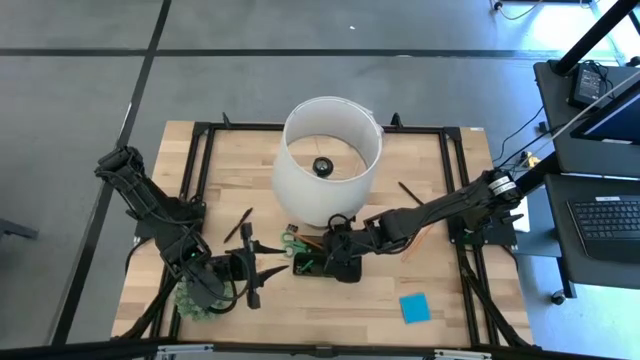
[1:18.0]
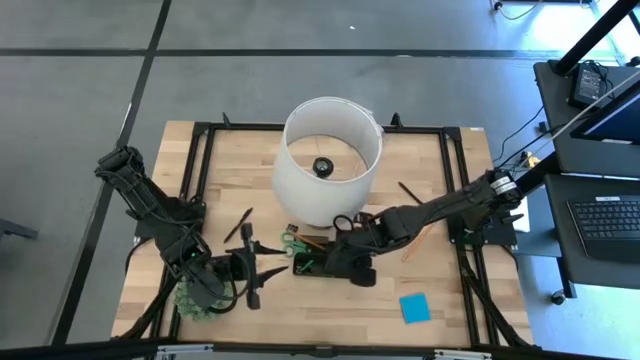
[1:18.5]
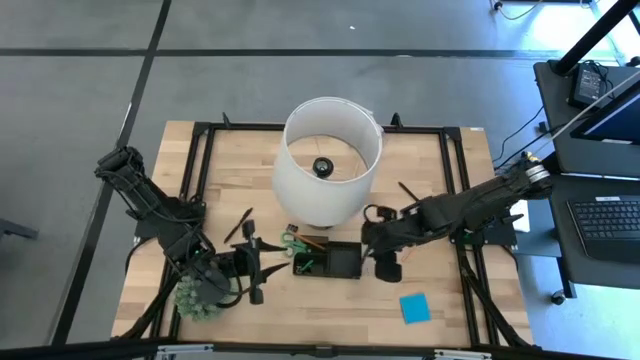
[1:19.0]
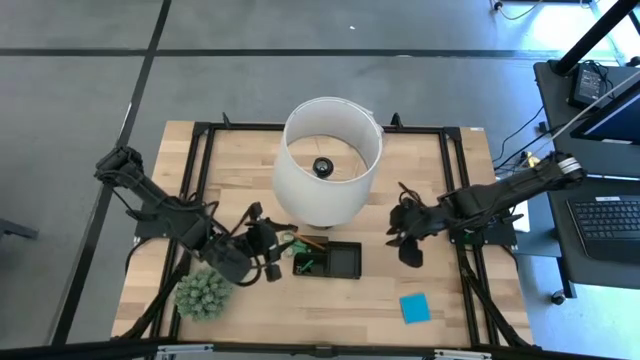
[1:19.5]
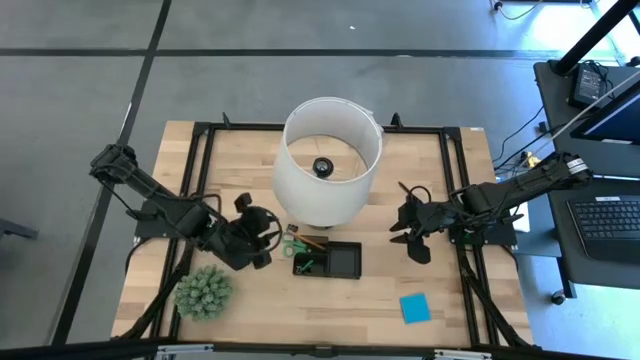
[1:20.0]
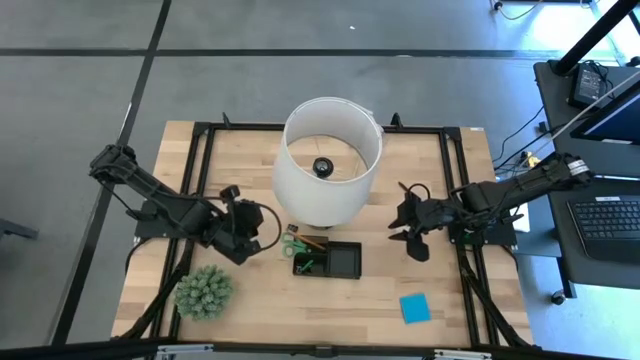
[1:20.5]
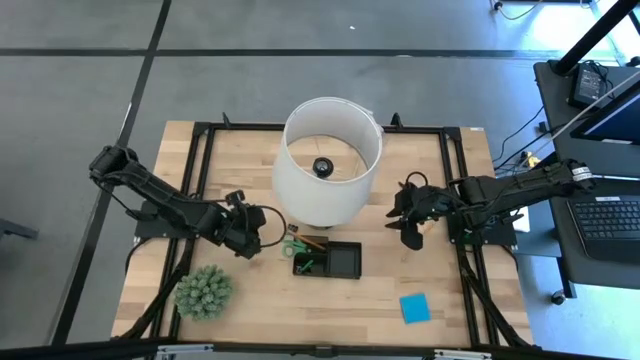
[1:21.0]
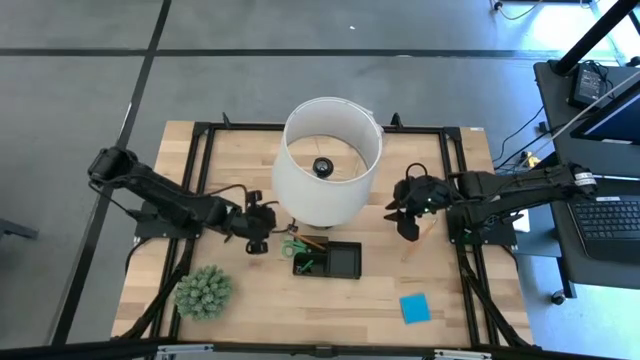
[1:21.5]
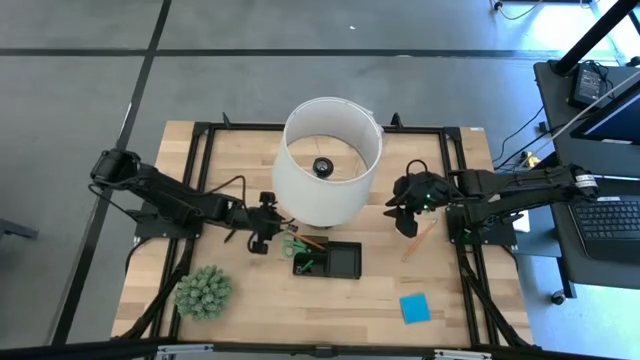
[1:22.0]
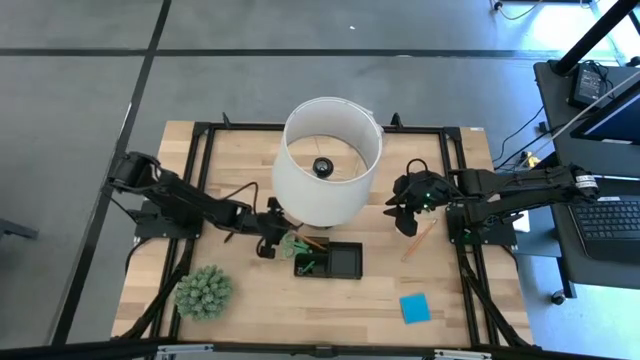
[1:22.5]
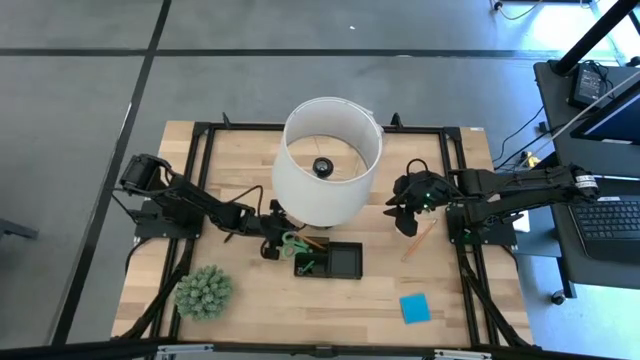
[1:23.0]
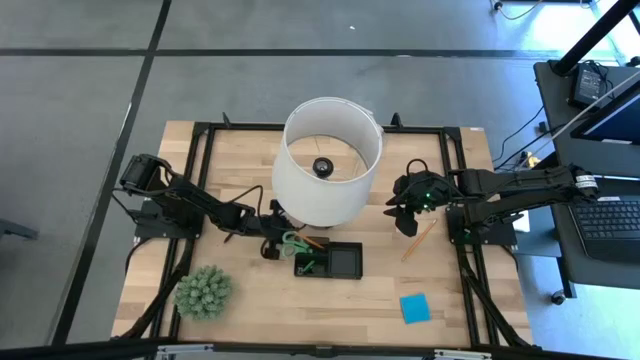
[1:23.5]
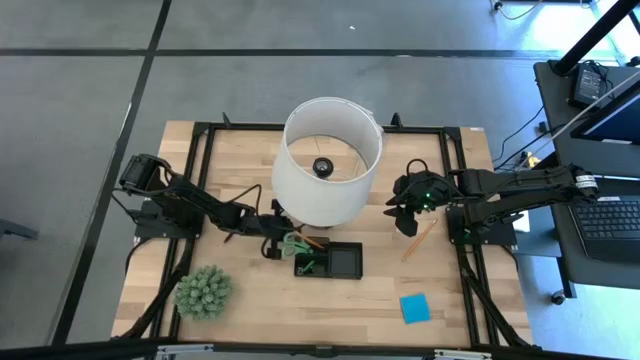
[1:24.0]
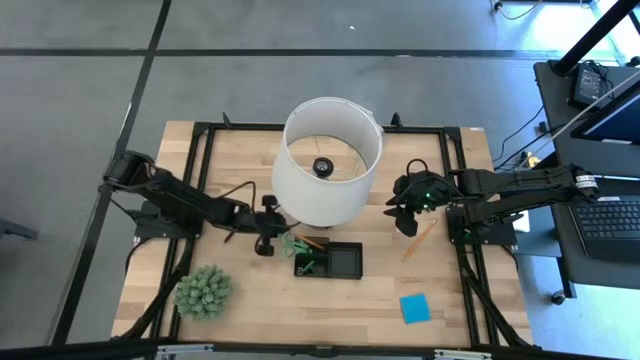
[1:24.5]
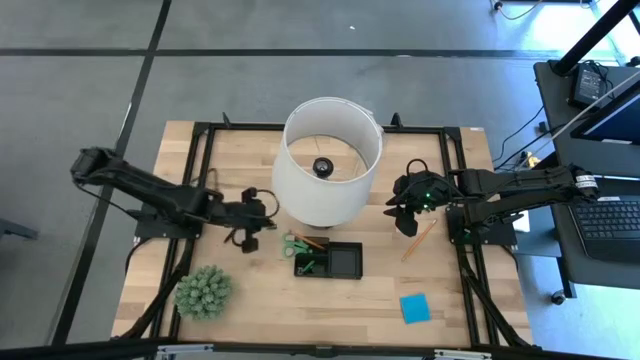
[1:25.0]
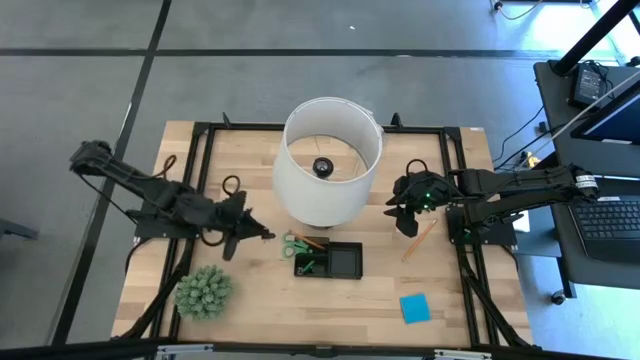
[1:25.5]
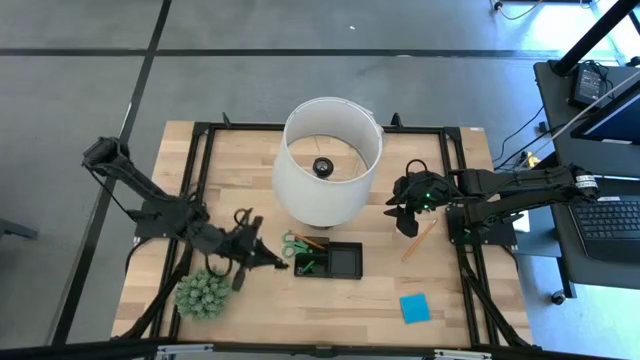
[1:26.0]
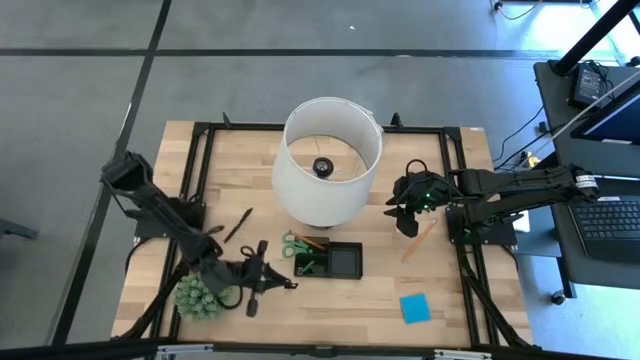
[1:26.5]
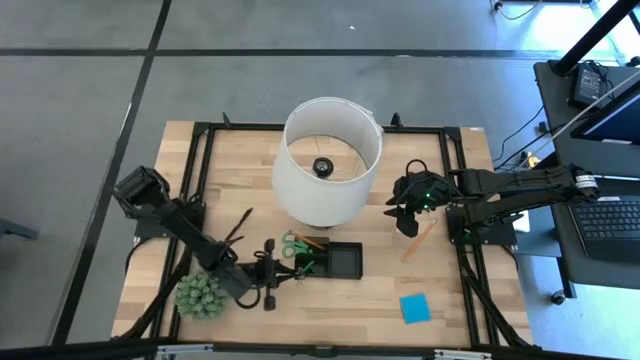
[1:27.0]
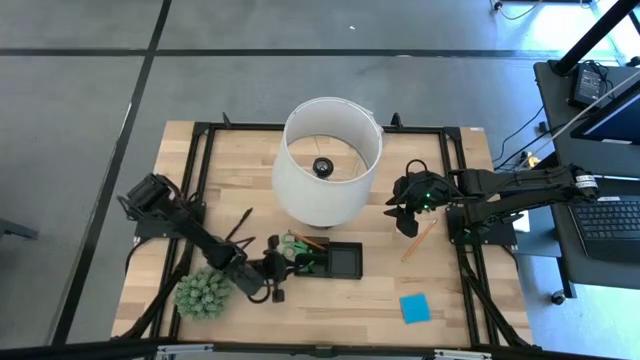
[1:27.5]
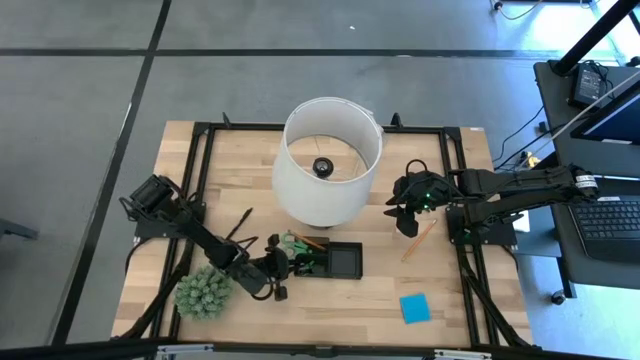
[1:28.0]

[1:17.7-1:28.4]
Task: Pick and place office supplies into organizer
Put the black binder clip into the black desk organizer

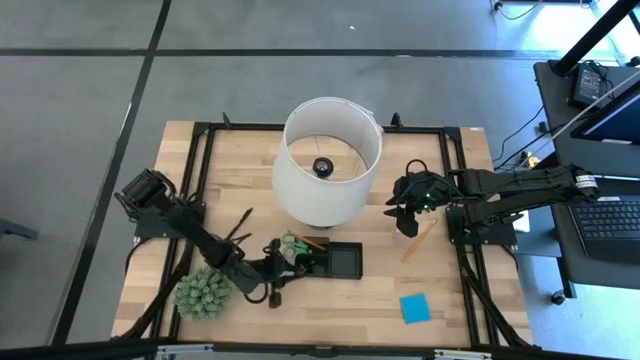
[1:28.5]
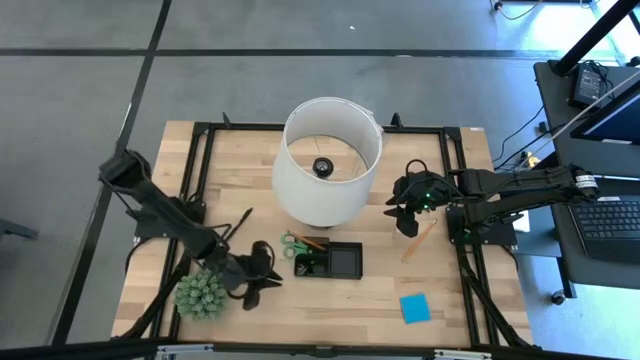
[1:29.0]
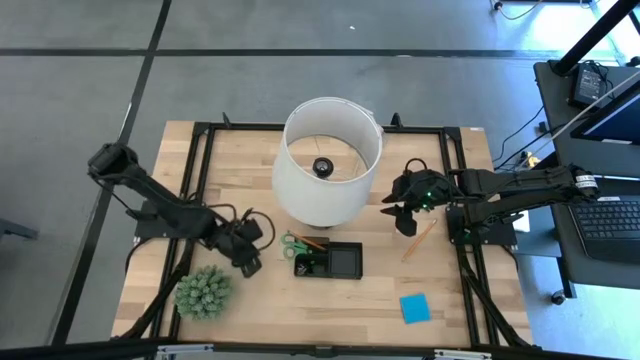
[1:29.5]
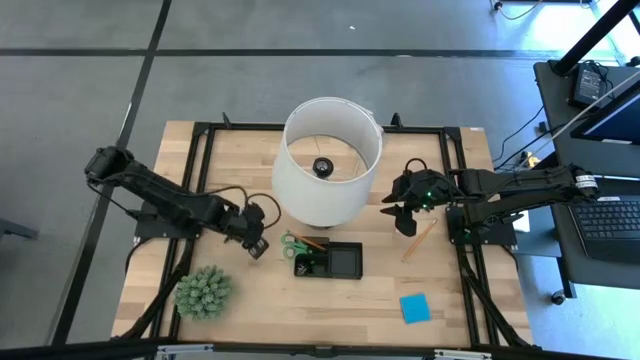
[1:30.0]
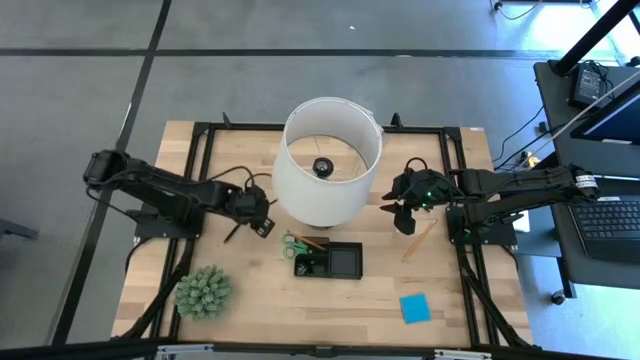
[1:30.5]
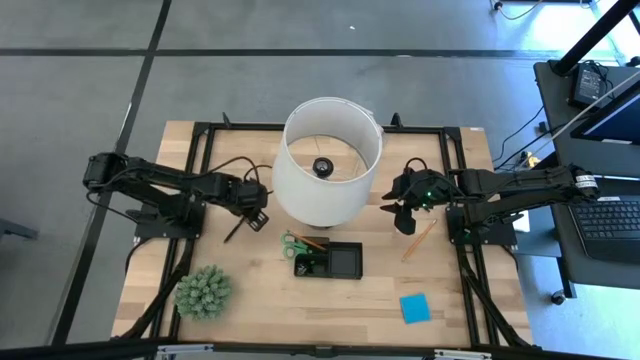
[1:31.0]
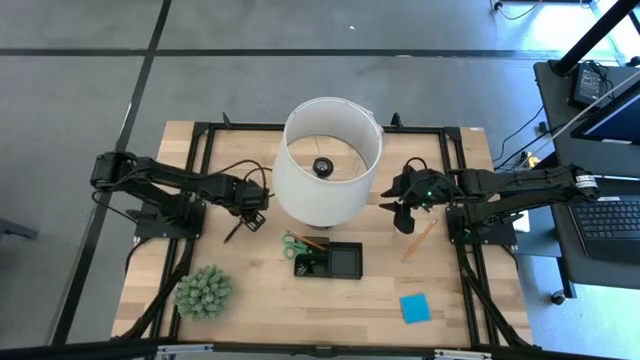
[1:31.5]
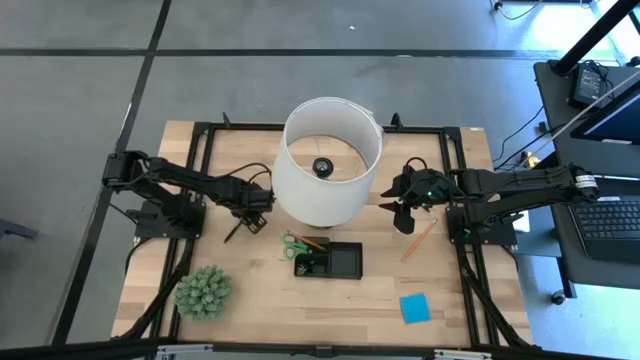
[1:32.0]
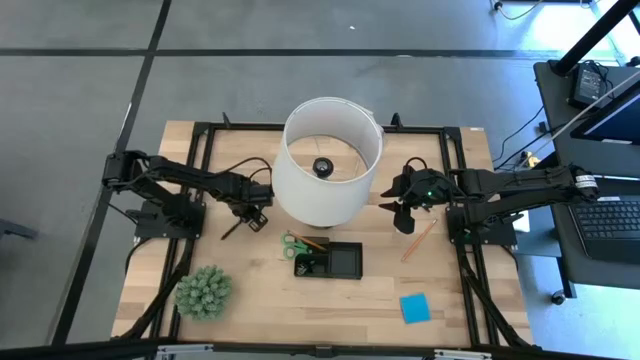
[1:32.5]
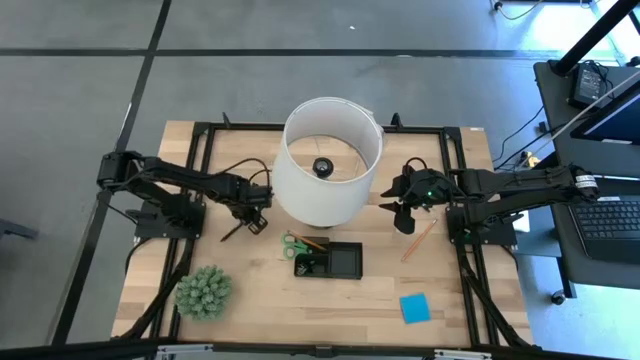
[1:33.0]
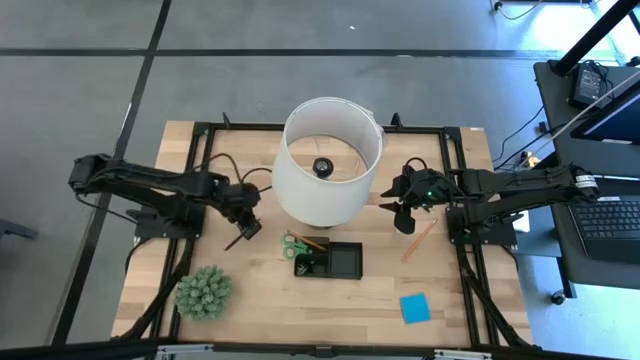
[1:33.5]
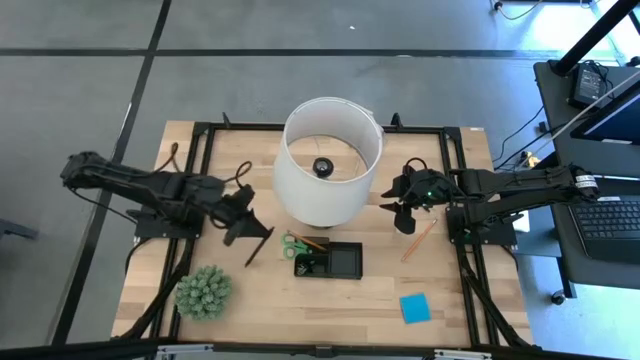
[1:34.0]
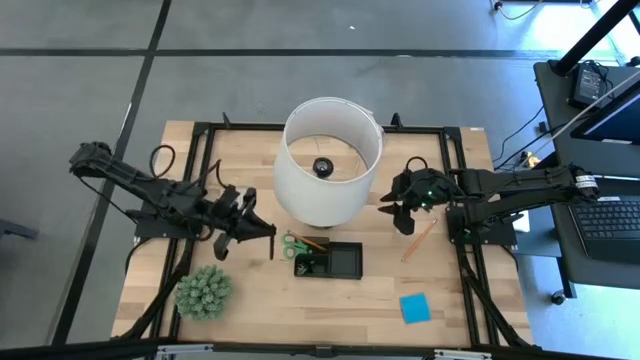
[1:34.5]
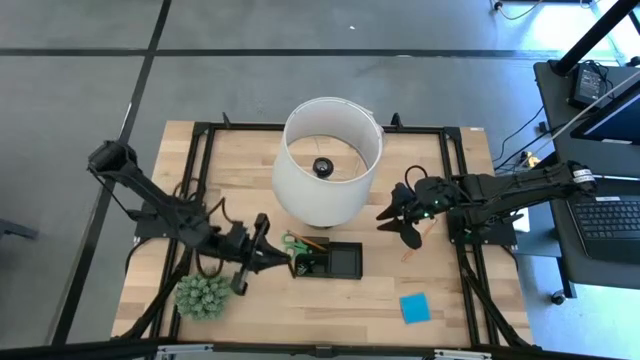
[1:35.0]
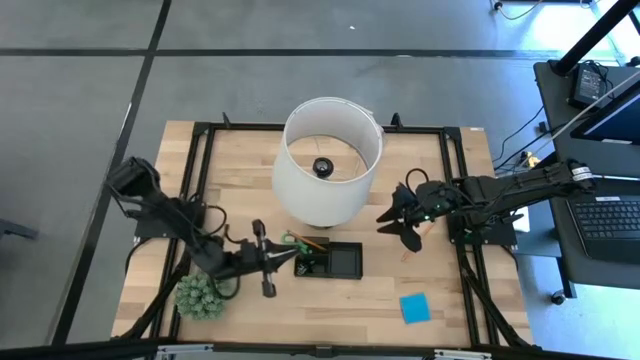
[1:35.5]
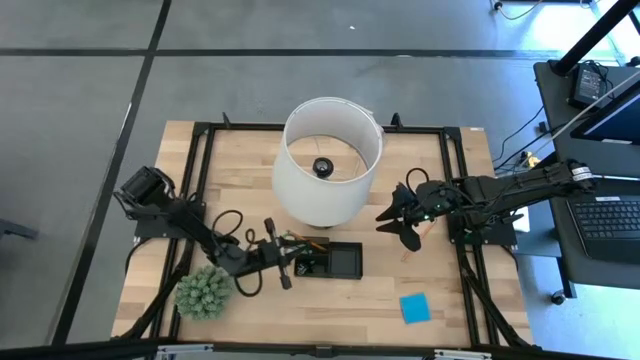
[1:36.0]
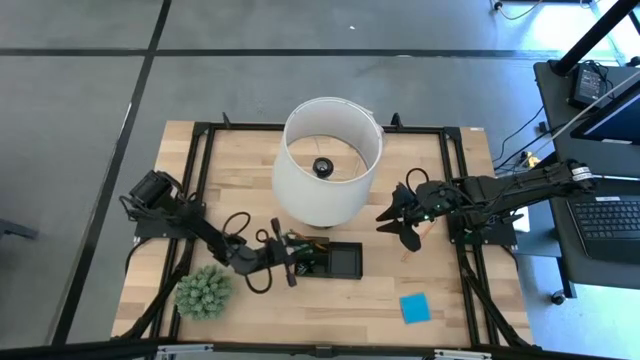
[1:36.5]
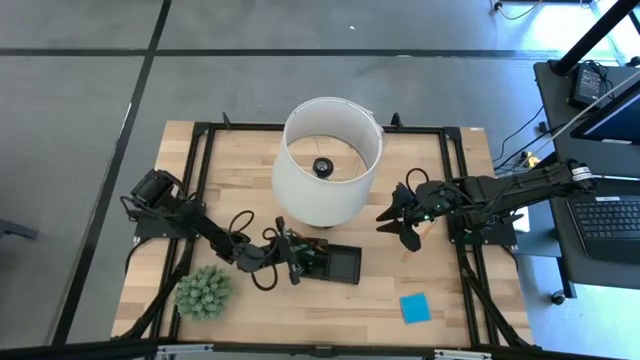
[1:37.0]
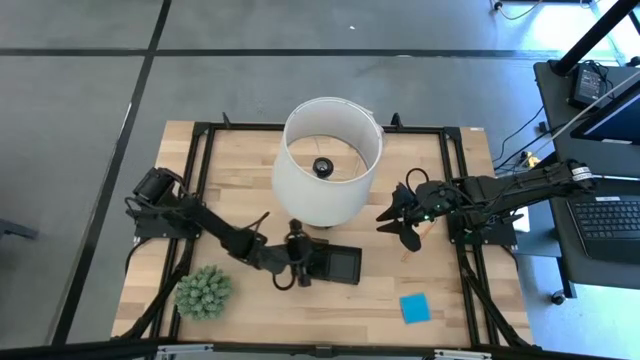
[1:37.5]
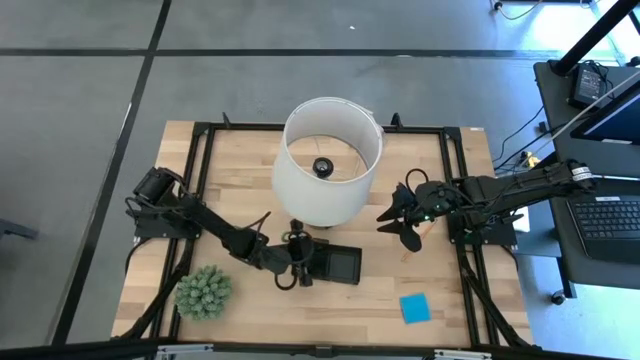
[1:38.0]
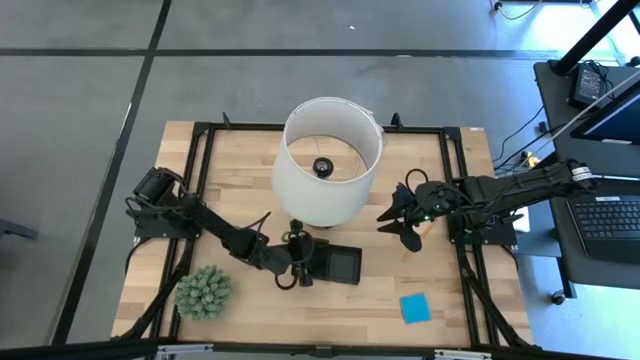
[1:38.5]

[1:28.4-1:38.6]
Put the bottom black pen into the black desk
